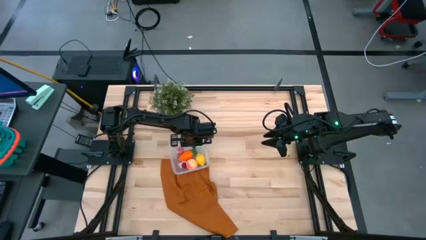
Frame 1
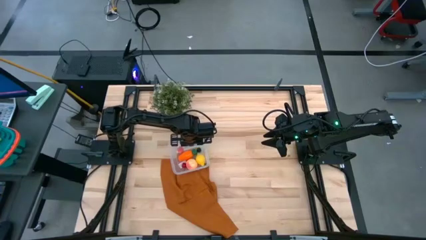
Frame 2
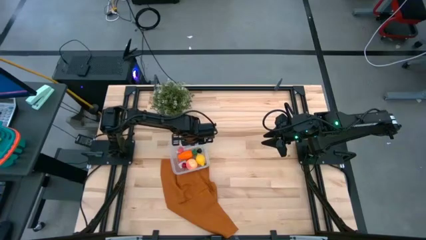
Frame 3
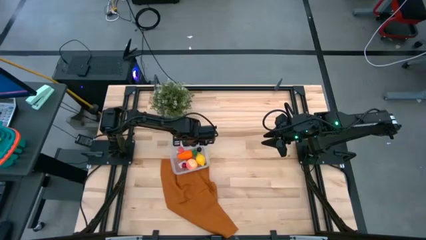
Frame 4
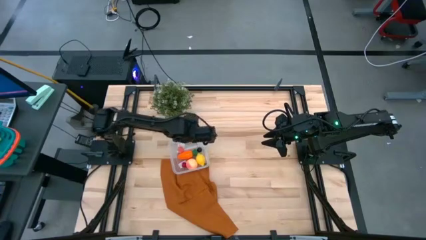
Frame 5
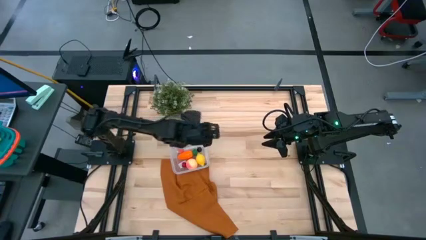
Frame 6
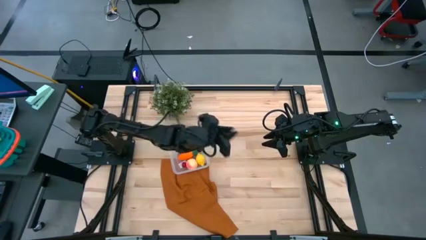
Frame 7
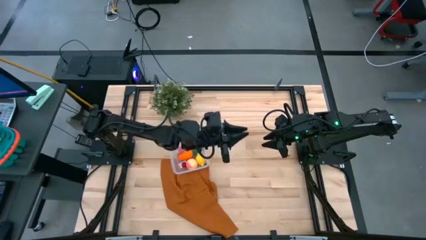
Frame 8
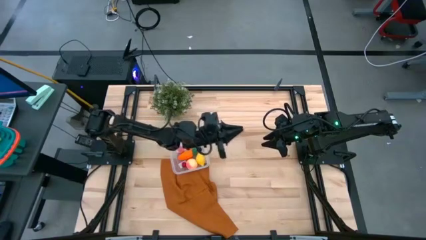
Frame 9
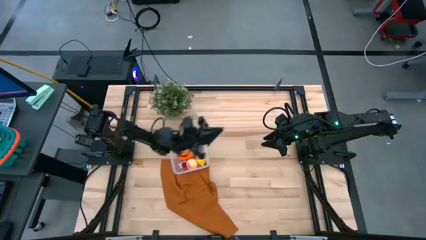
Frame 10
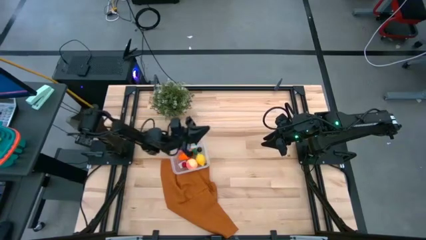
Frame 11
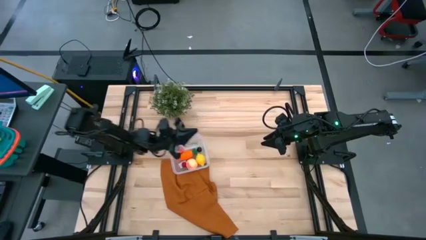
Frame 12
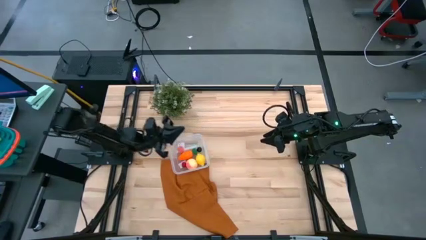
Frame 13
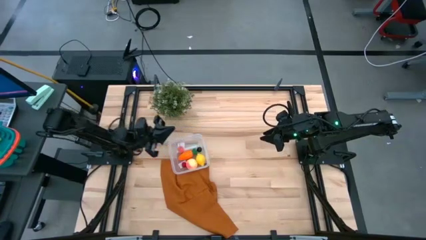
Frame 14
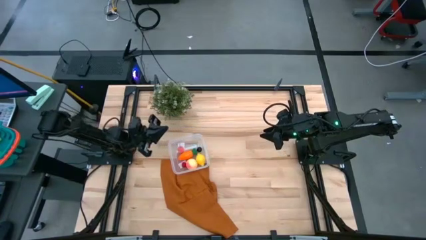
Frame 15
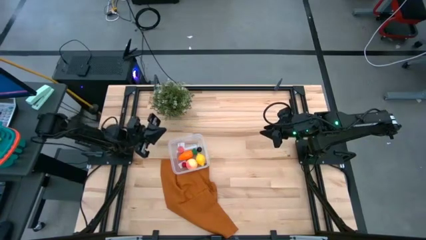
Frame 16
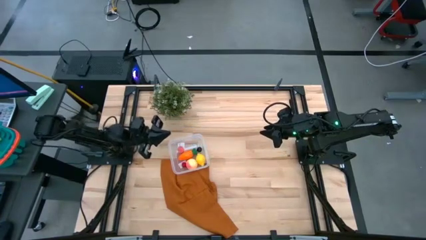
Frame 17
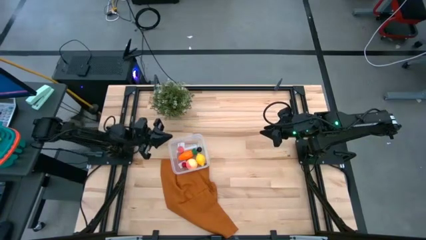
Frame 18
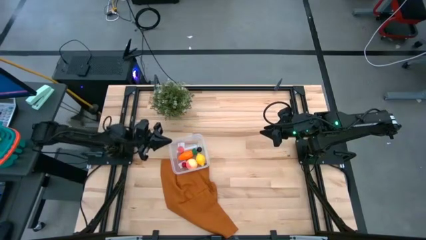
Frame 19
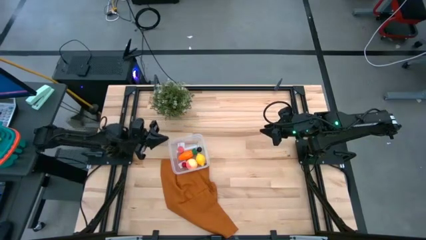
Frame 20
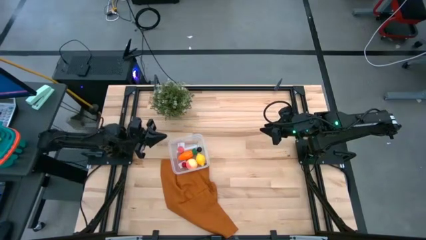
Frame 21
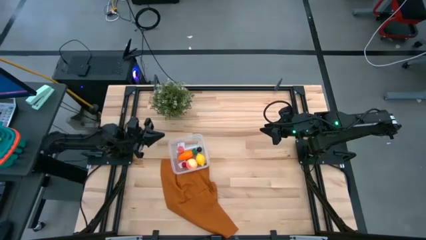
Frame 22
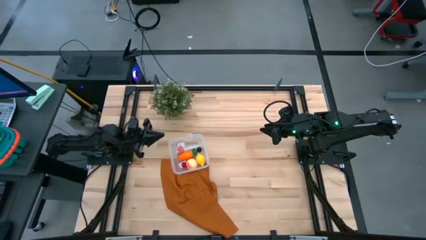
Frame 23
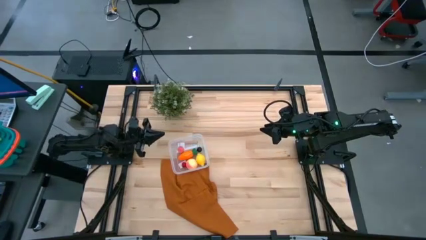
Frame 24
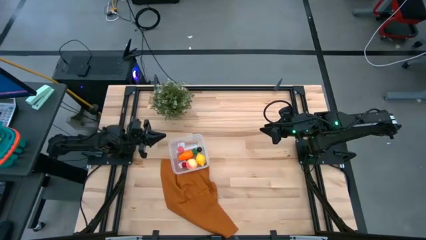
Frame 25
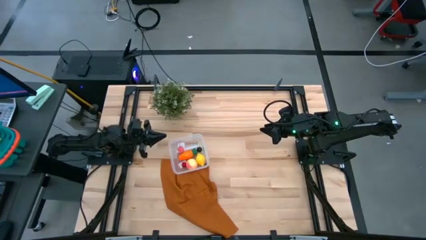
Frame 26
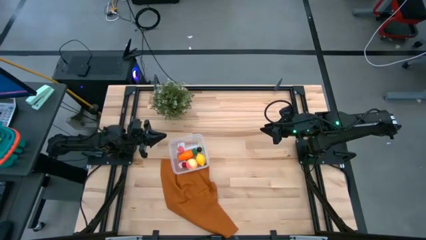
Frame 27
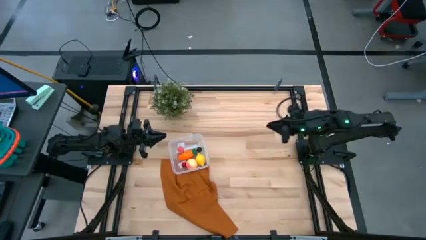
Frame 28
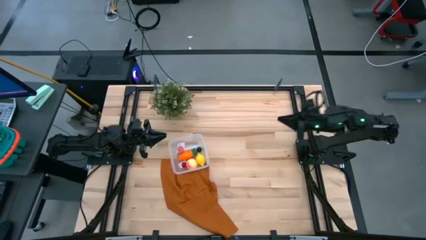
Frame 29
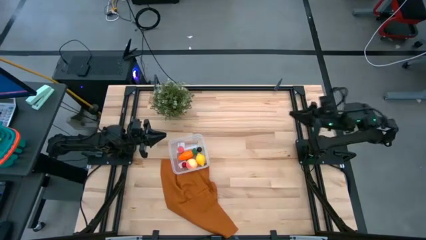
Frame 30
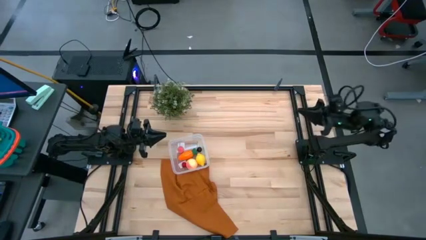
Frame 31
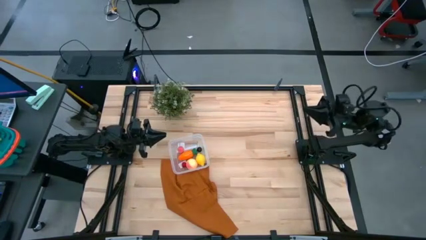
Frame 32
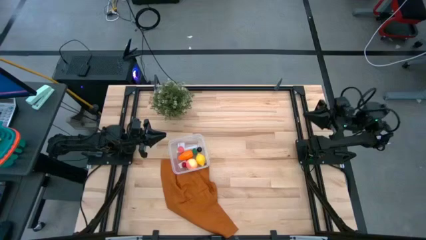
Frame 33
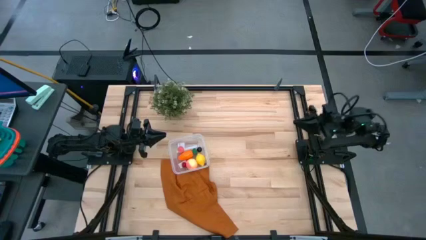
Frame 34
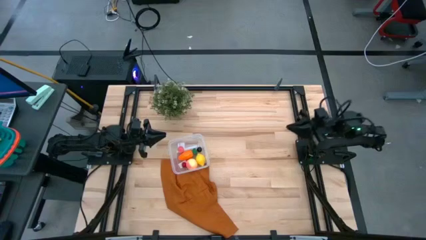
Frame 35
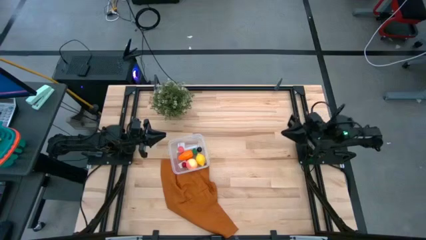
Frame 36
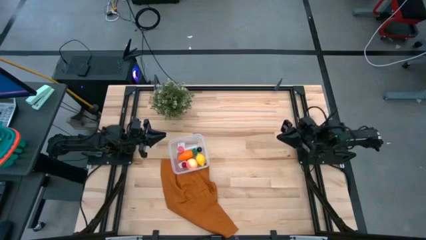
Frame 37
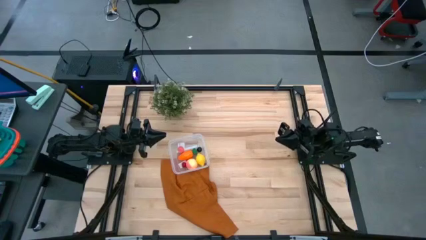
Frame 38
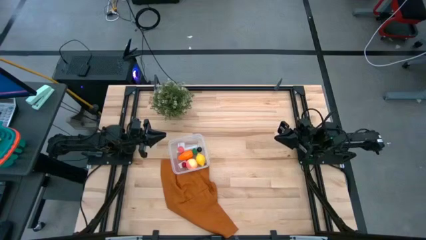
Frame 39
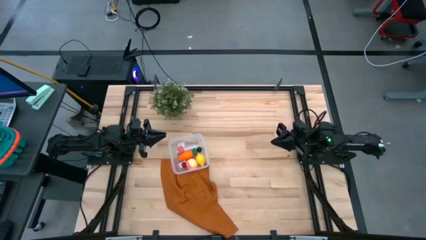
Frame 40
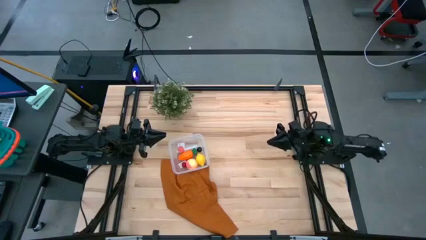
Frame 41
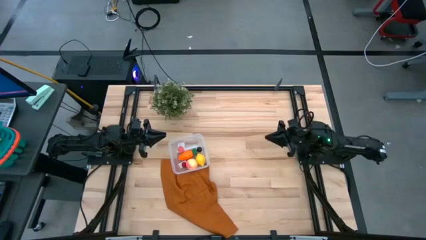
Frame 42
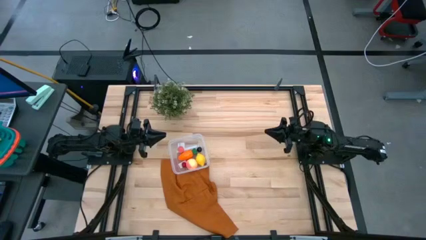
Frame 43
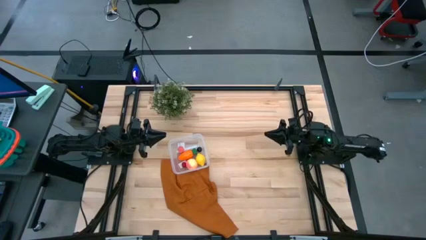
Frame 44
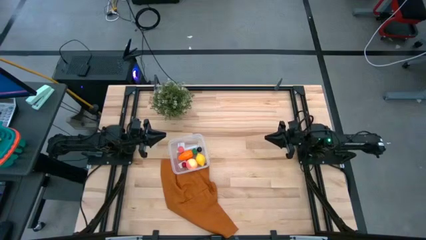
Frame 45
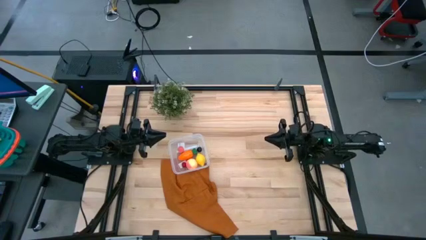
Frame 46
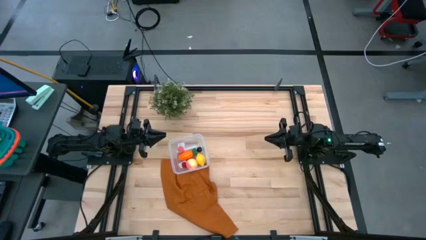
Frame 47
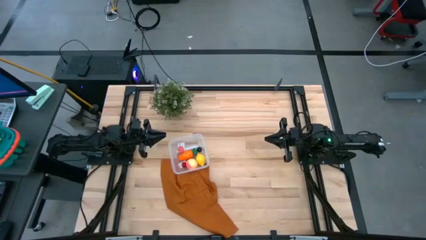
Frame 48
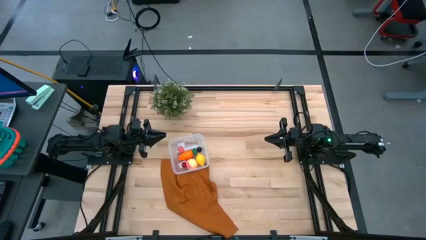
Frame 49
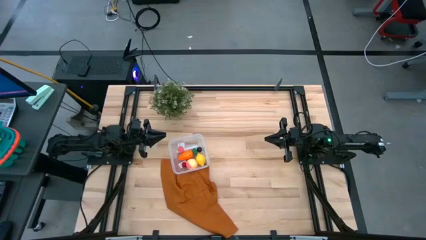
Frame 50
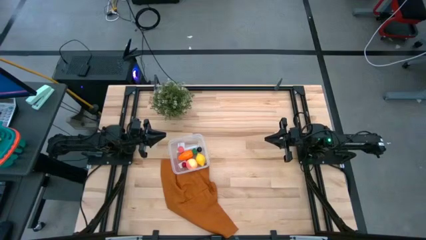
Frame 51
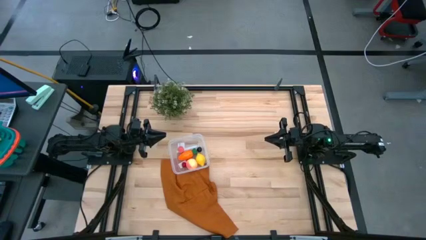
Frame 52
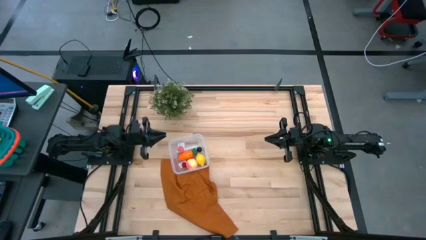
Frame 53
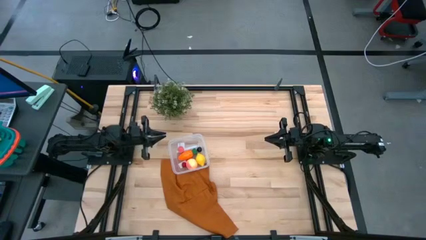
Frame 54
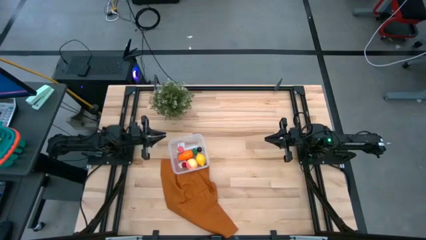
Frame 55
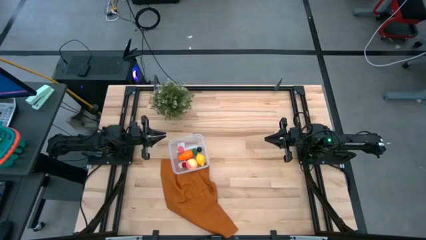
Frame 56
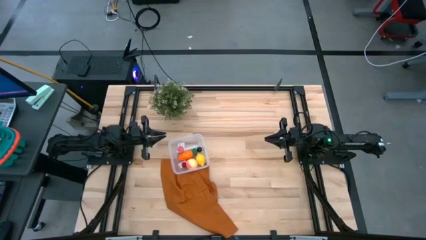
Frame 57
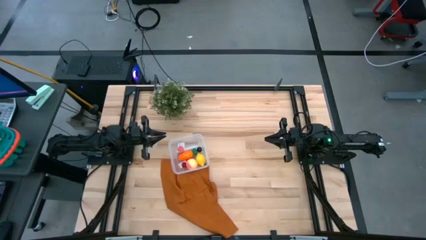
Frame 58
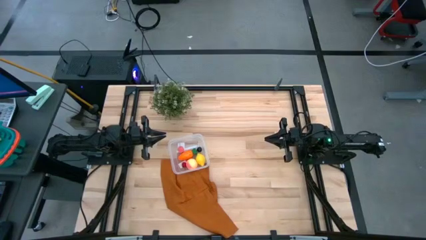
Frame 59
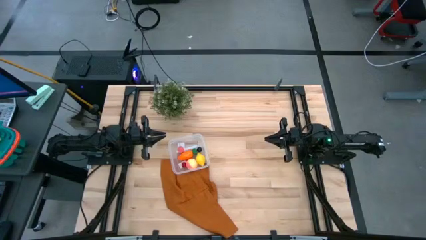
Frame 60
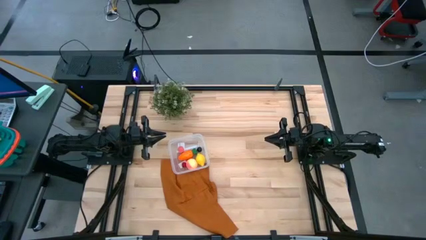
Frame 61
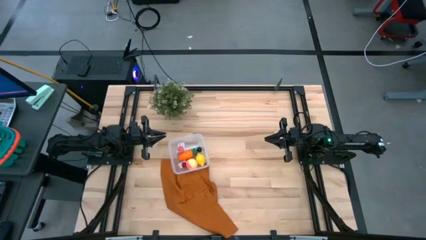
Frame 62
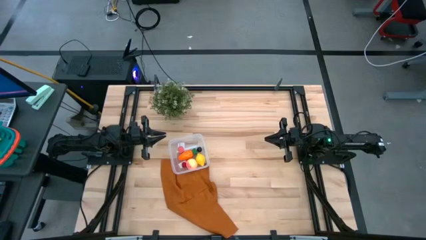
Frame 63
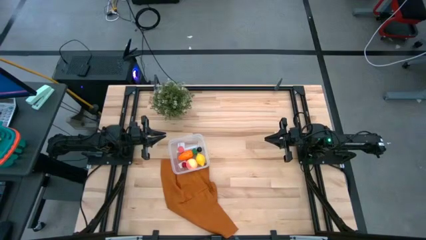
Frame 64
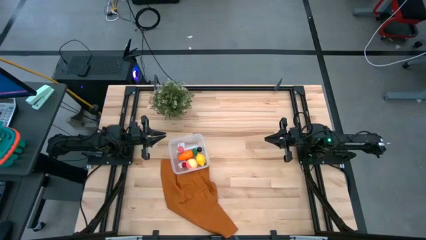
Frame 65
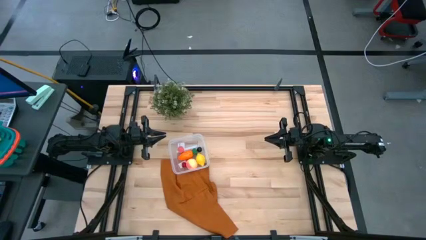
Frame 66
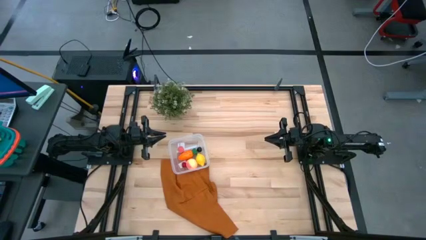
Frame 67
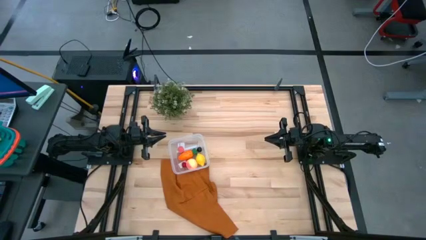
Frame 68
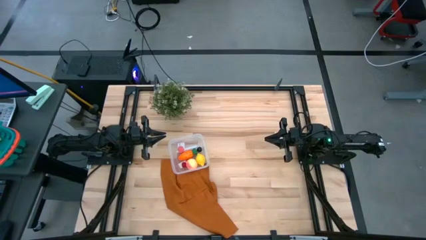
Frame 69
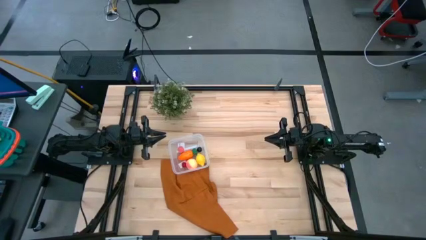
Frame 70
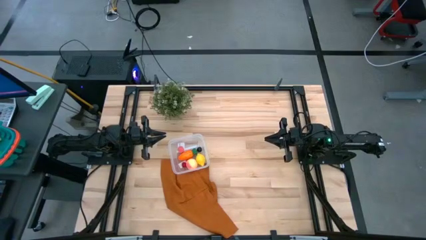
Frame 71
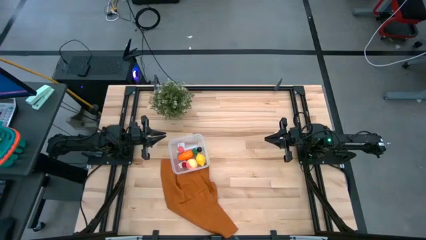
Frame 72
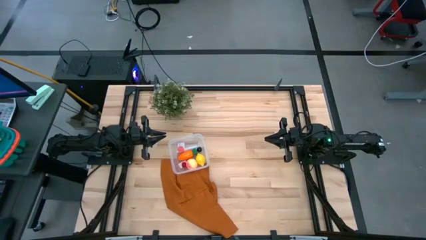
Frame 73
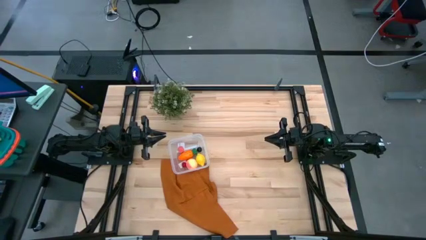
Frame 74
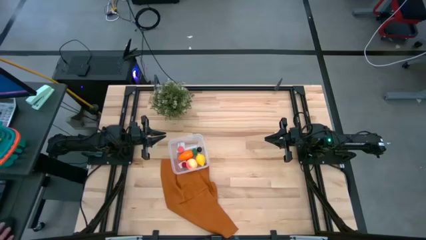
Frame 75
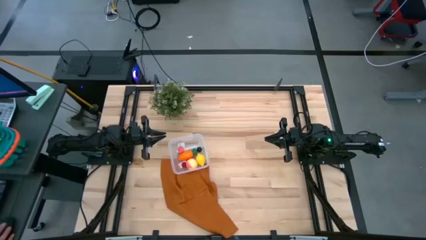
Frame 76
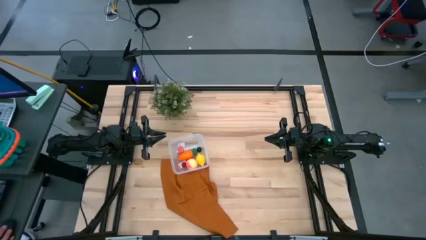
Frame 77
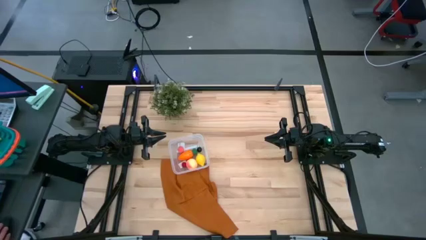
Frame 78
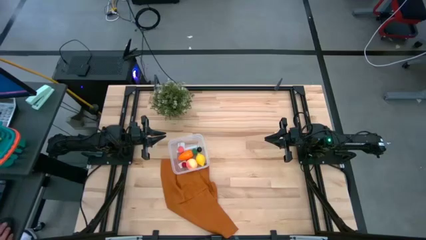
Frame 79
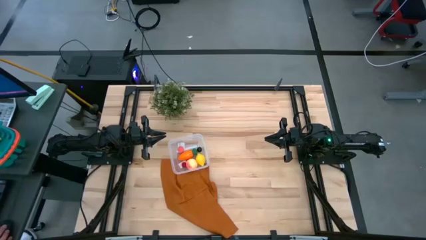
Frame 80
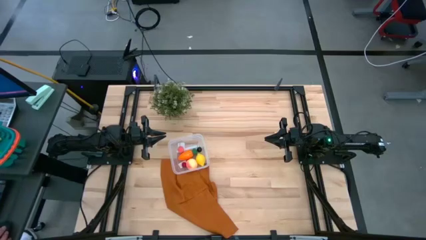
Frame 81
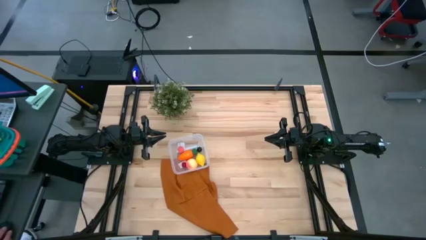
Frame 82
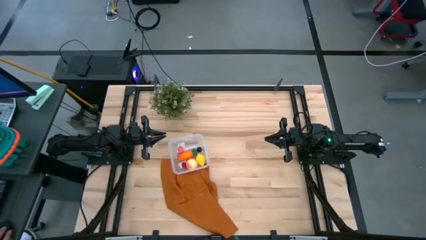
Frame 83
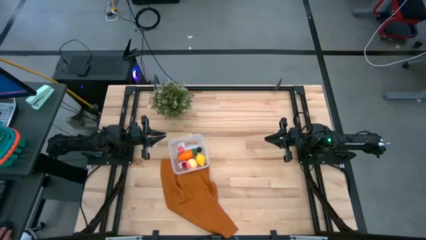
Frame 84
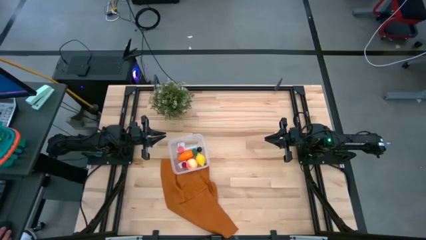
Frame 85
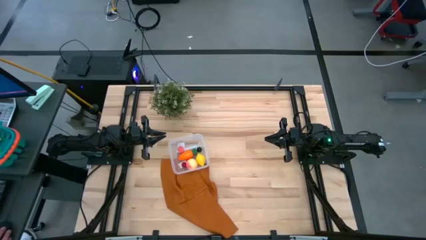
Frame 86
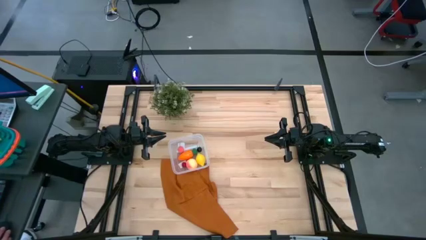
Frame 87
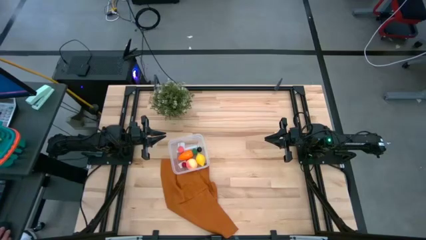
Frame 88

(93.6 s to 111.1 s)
Task: Pick and placing Produce into tupperware
Return to Home Position
